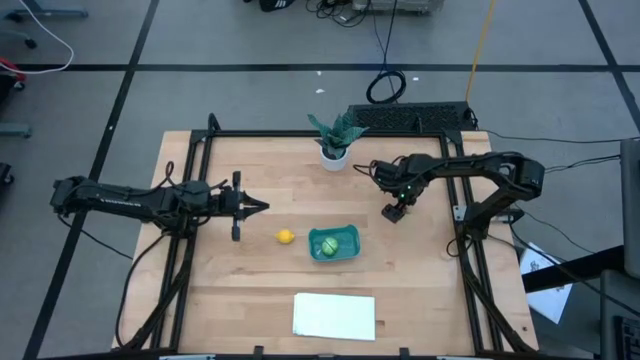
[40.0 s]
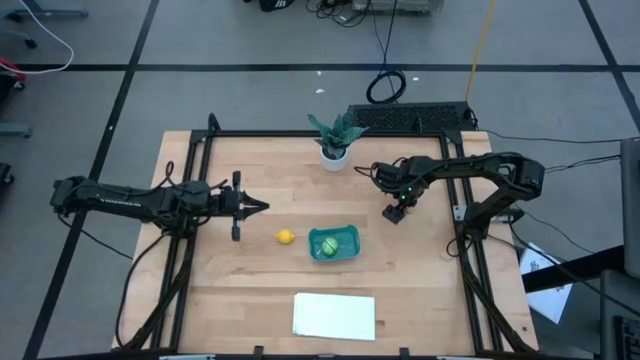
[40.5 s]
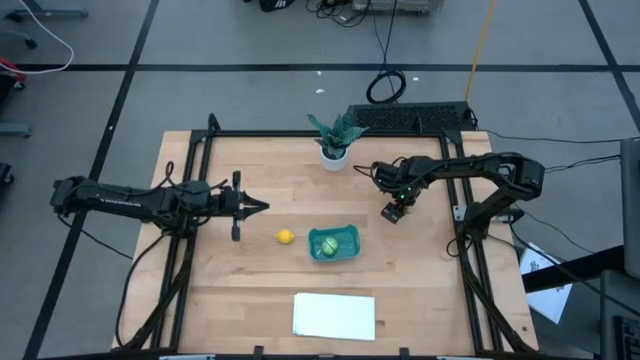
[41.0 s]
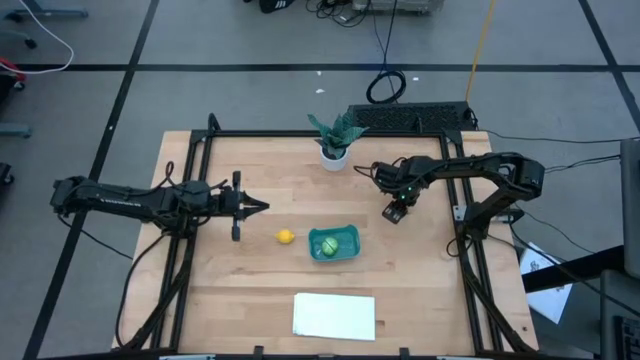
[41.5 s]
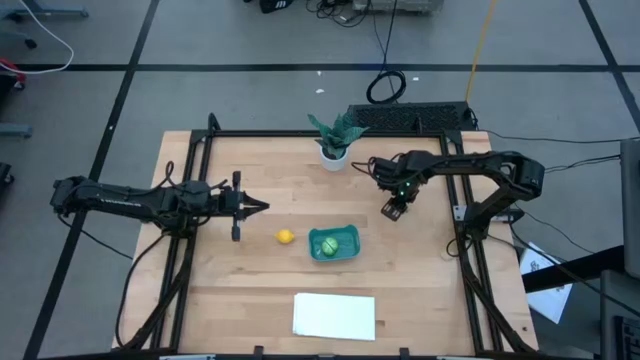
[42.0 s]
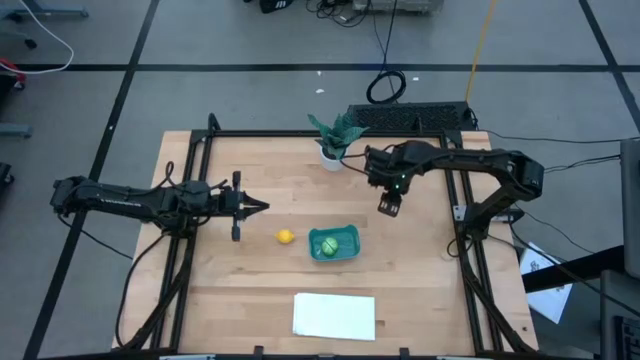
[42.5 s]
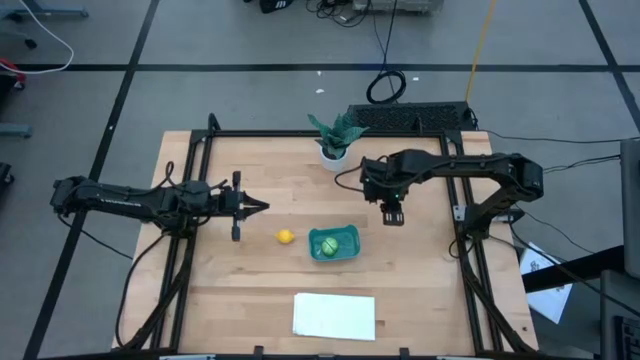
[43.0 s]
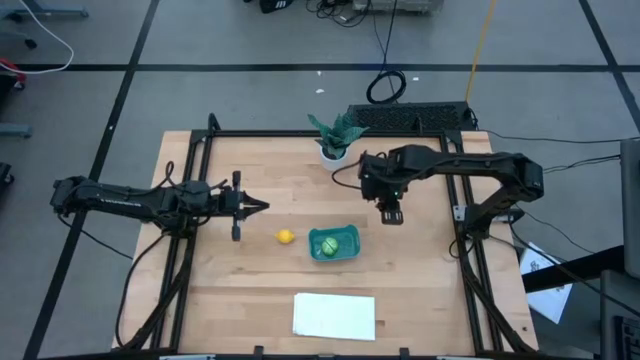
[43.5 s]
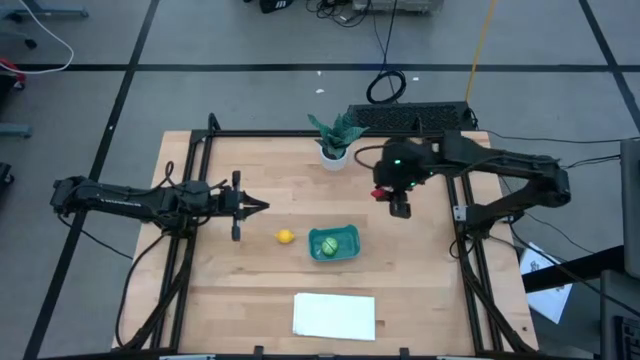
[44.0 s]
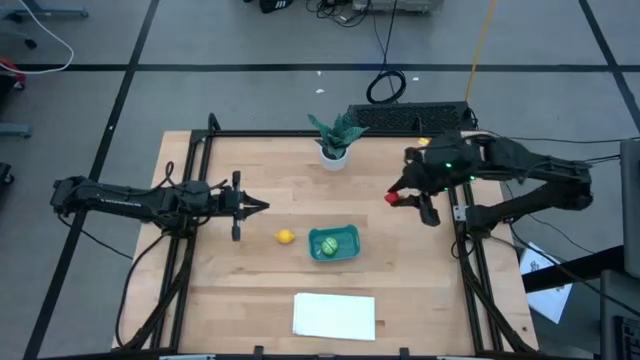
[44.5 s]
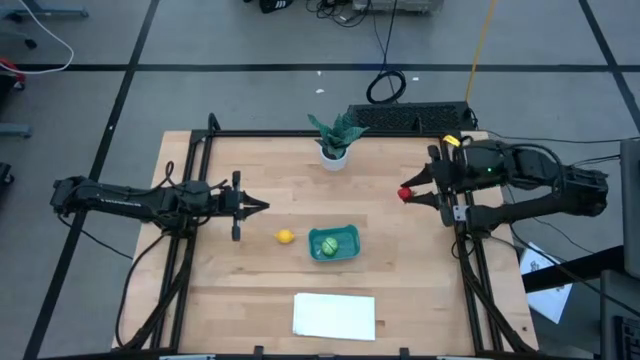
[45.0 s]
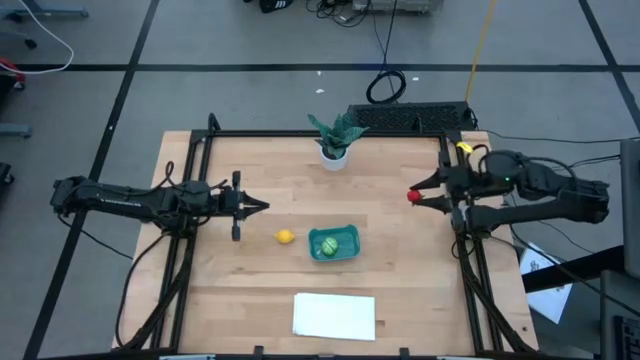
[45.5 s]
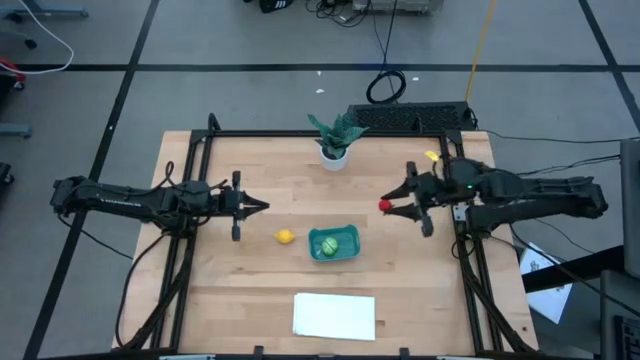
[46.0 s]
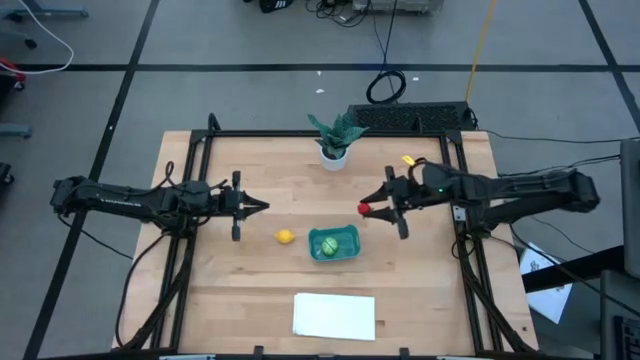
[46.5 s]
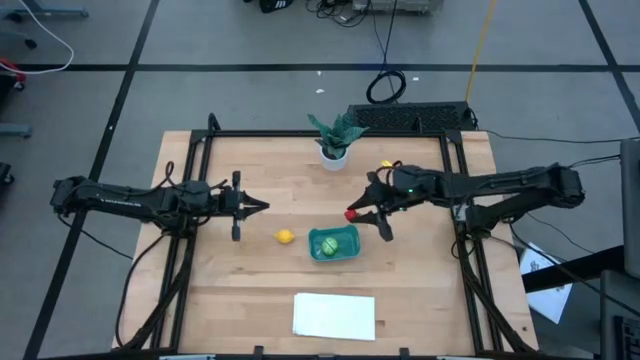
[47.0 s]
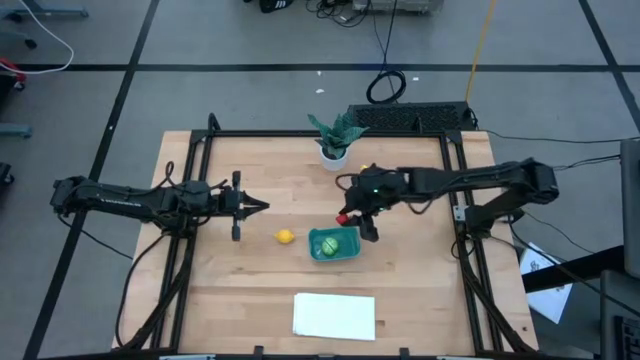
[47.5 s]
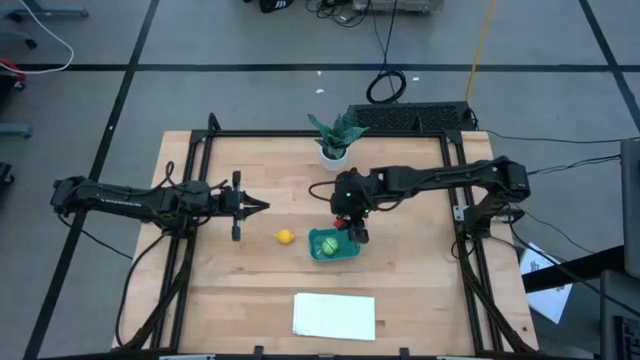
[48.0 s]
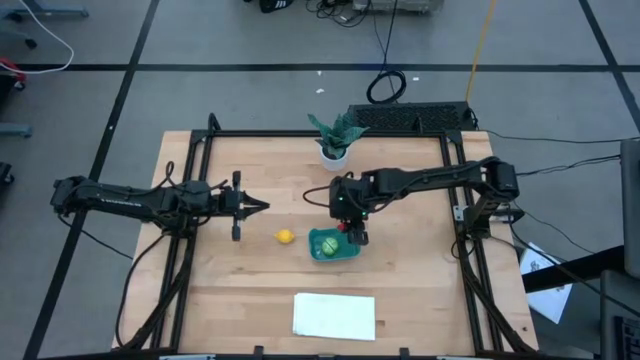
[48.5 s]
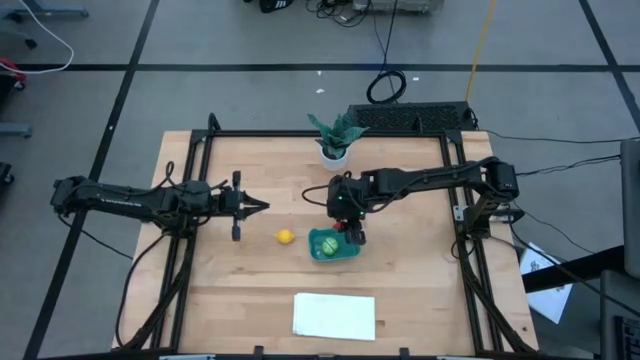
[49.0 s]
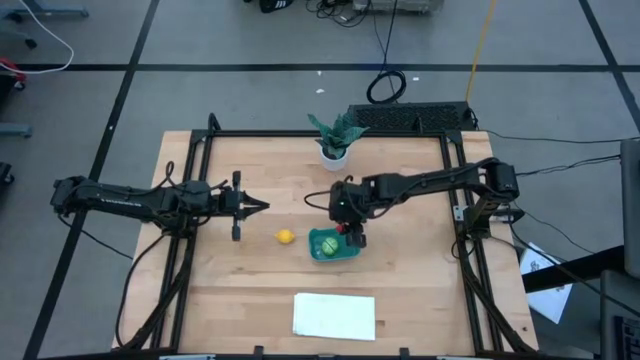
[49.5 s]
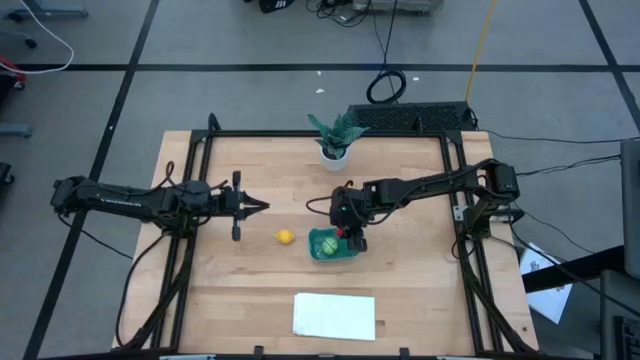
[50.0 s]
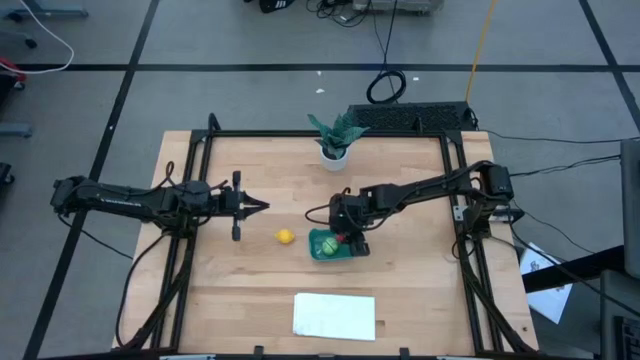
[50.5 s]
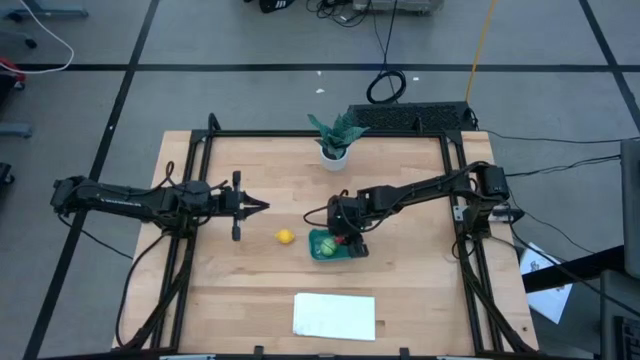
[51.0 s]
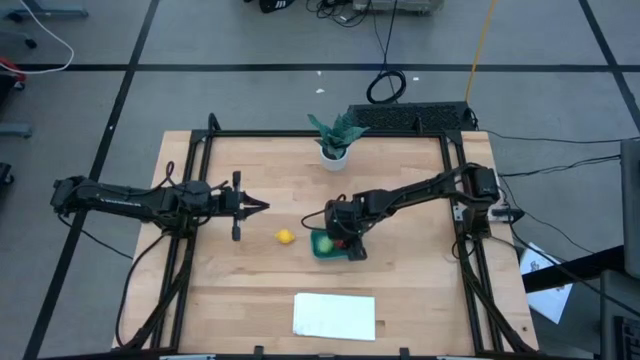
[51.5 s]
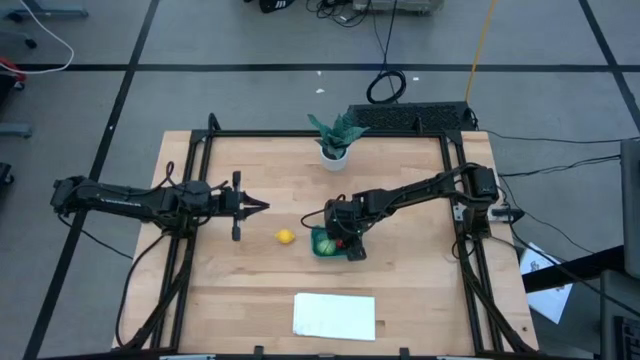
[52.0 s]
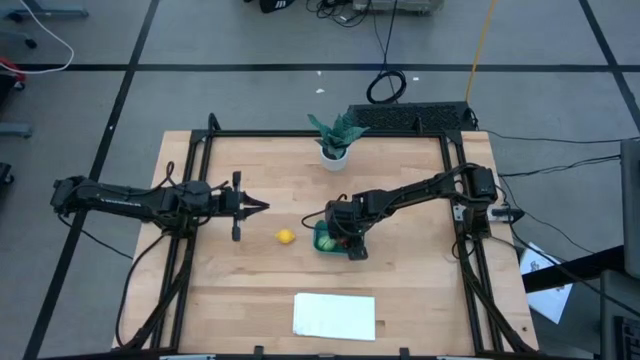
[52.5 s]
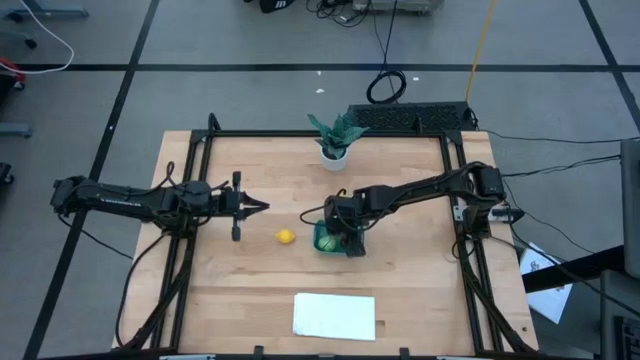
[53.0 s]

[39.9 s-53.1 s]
Task: Pick and placing Produce into tupperware
Put the strawberry into the green bin

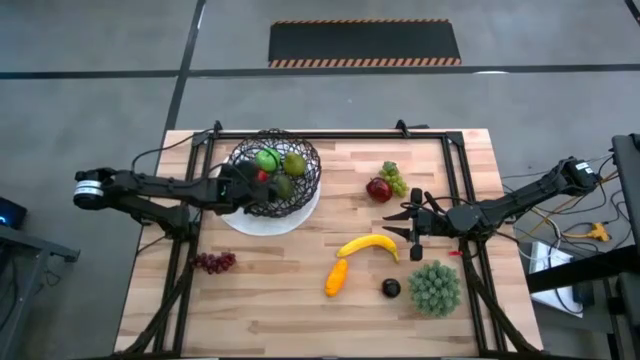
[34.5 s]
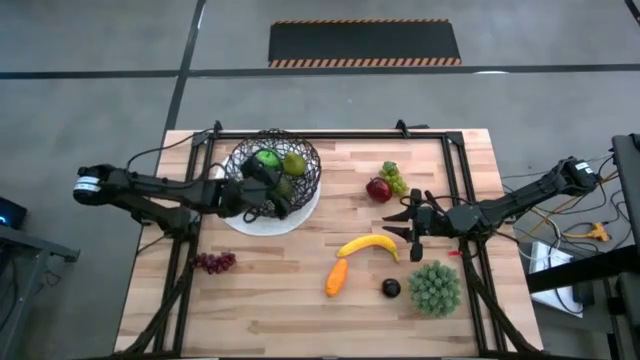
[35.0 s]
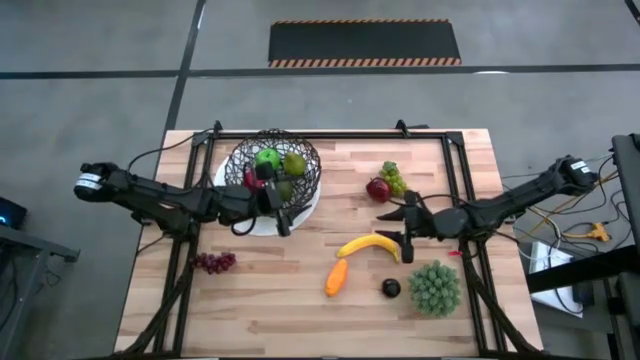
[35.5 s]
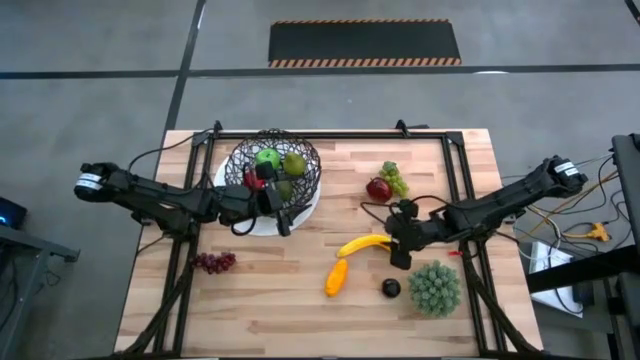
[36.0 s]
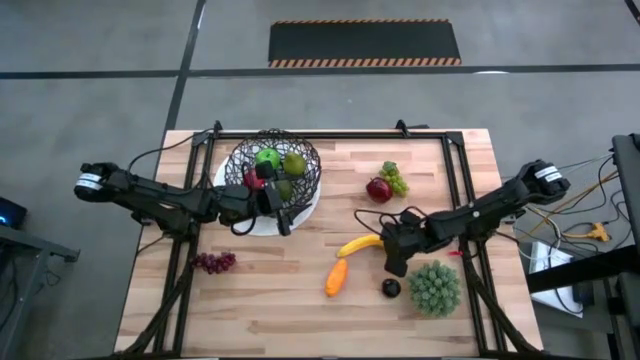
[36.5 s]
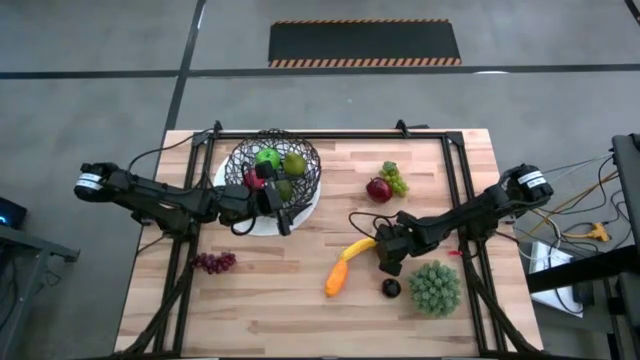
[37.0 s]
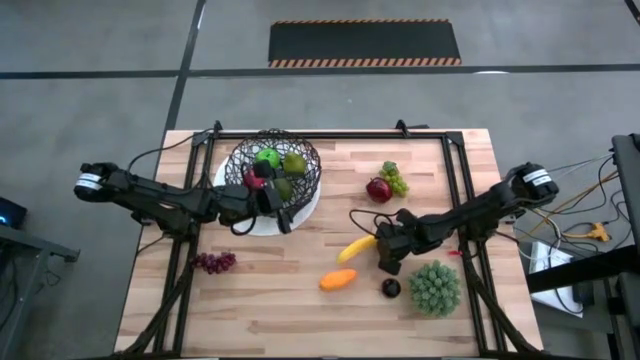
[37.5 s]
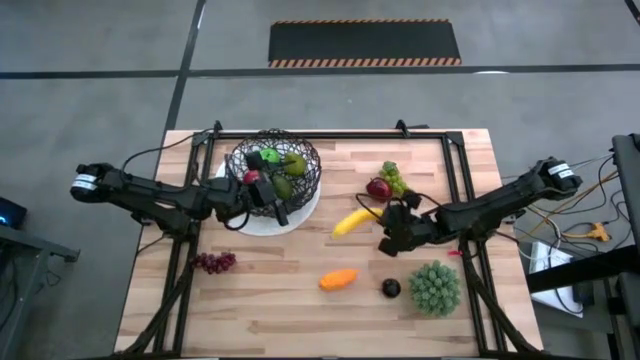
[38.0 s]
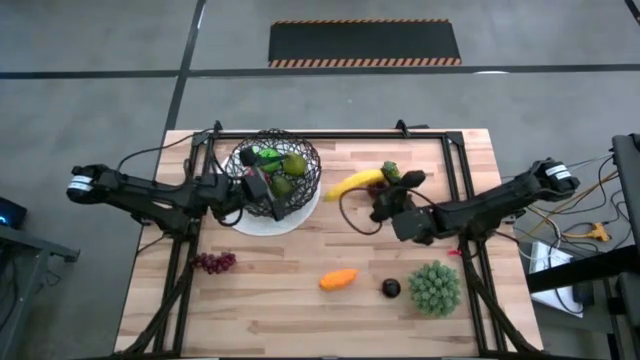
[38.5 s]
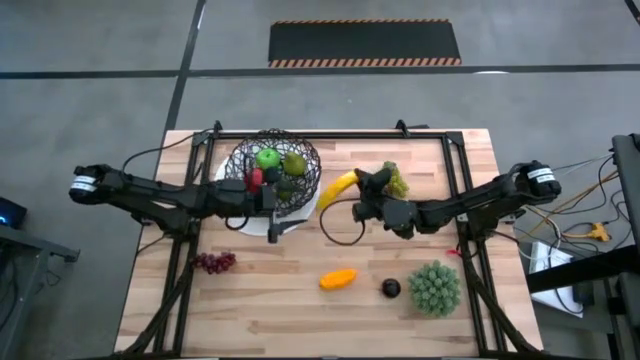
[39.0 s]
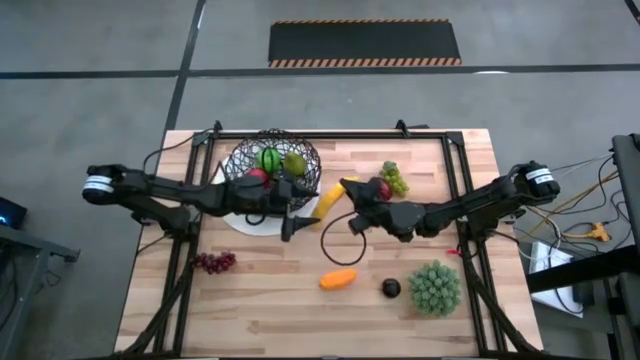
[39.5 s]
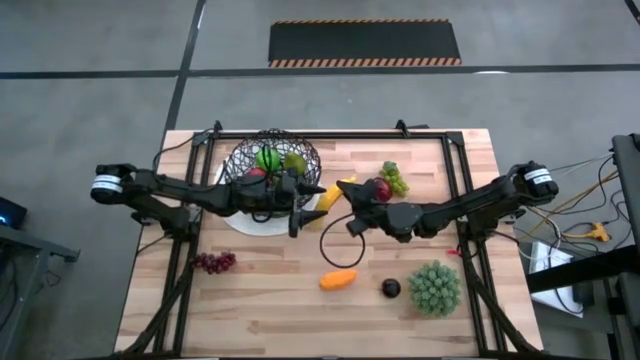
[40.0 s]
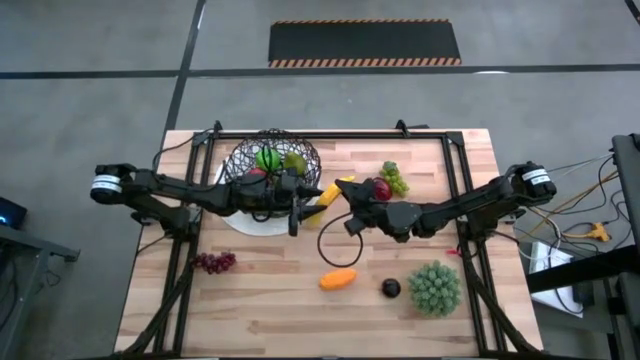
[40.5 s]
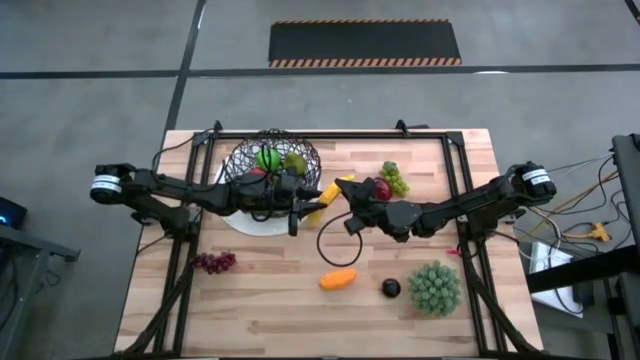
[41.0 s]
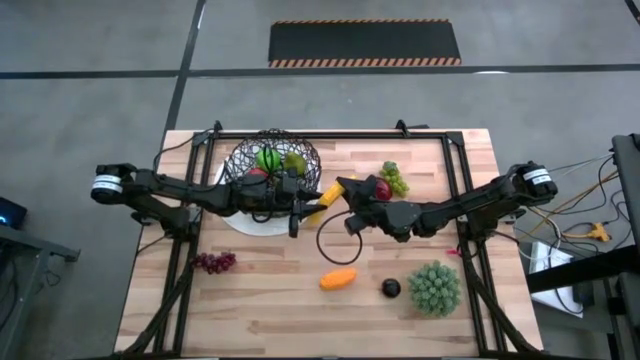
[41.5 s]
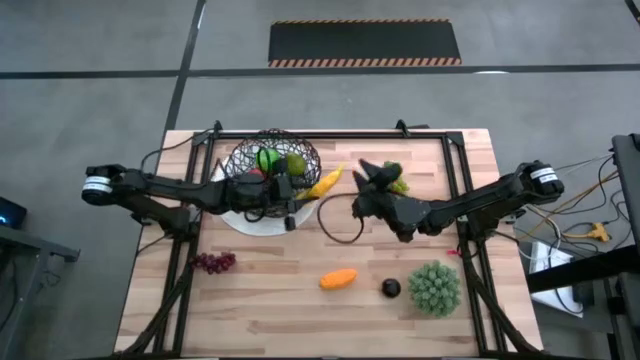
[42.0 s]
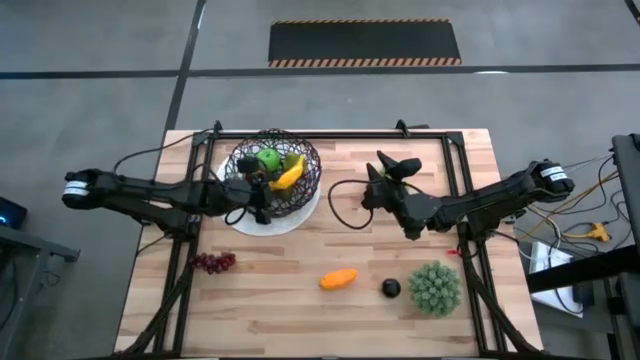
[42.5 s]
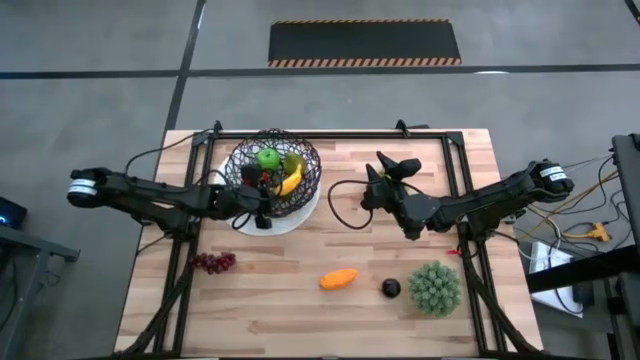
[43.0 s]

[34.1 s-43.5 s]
Task: Build produce basket
Put the banana into the woven basket
